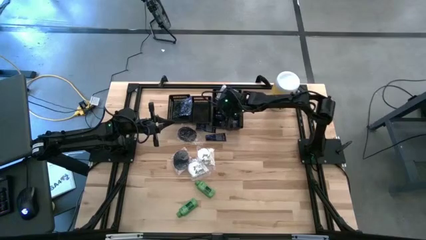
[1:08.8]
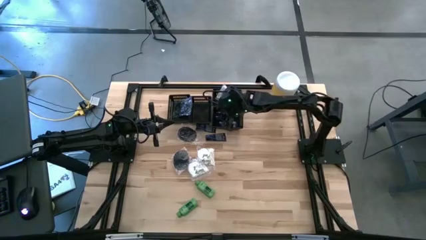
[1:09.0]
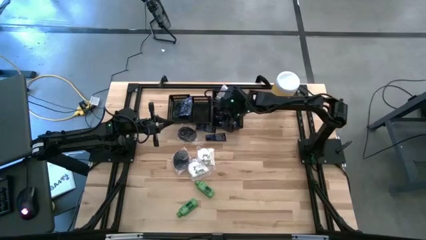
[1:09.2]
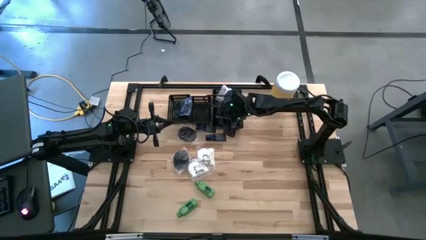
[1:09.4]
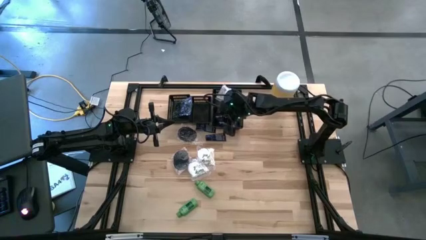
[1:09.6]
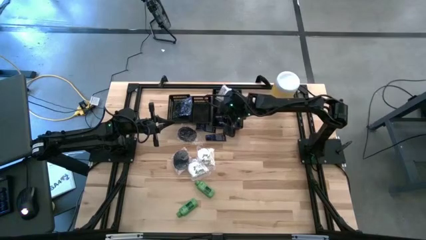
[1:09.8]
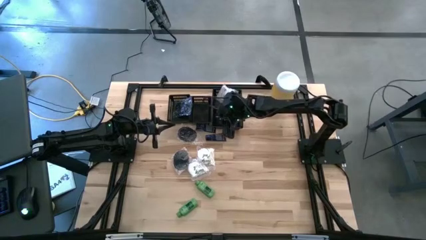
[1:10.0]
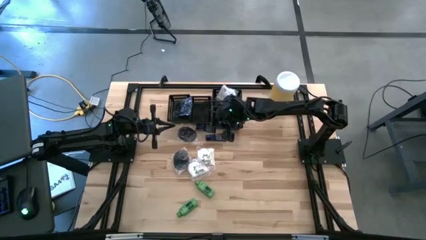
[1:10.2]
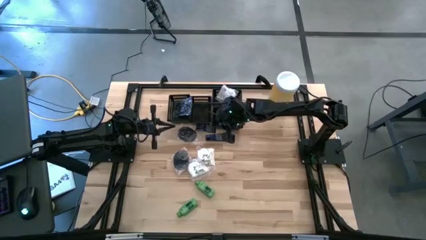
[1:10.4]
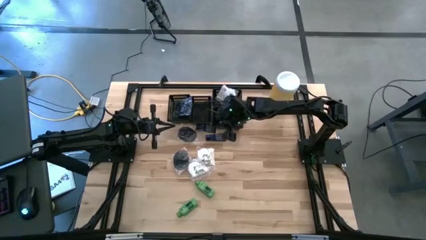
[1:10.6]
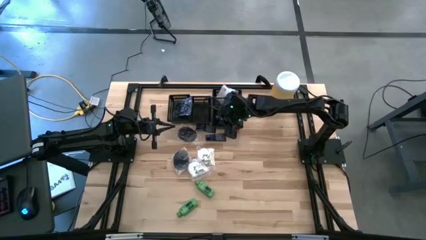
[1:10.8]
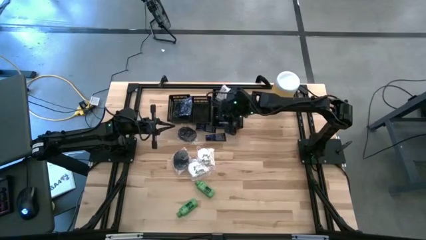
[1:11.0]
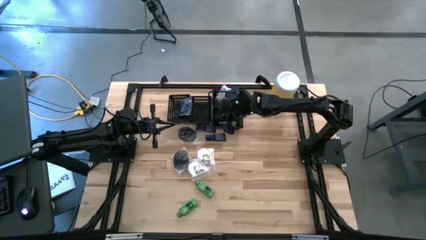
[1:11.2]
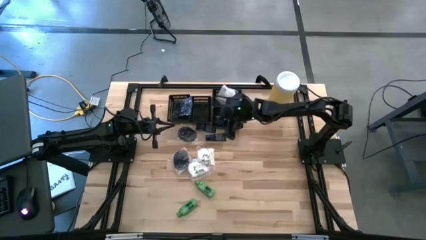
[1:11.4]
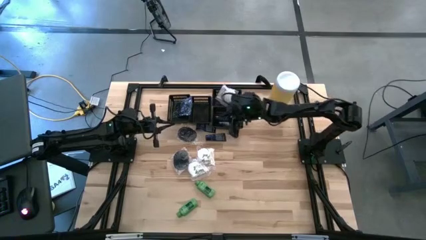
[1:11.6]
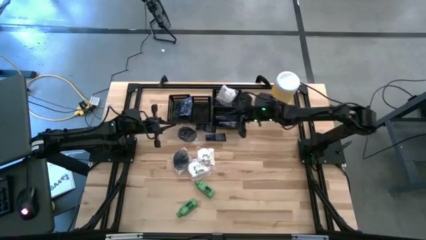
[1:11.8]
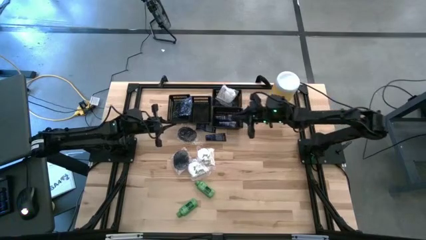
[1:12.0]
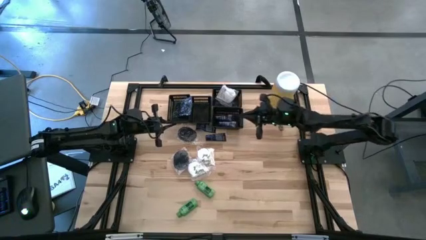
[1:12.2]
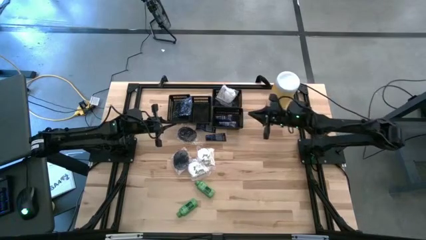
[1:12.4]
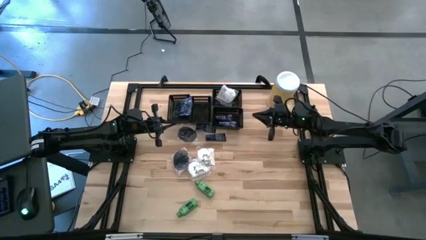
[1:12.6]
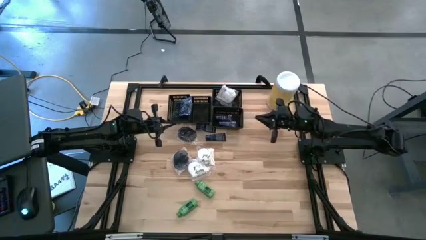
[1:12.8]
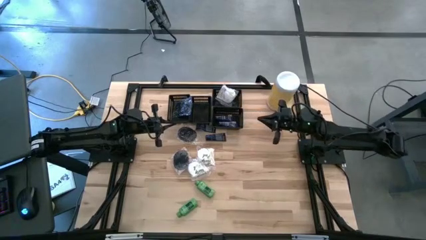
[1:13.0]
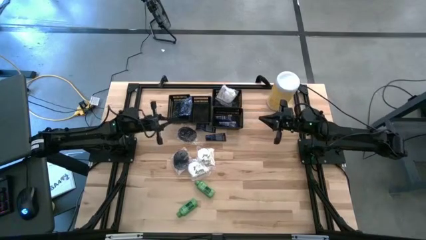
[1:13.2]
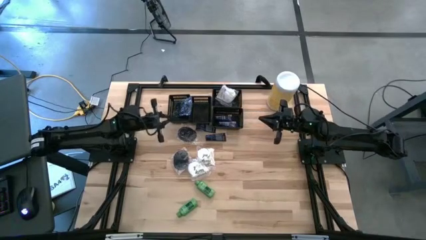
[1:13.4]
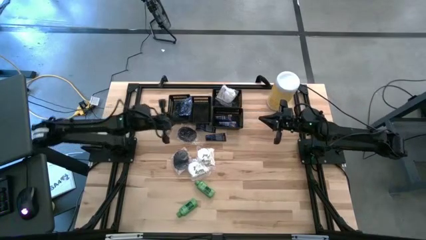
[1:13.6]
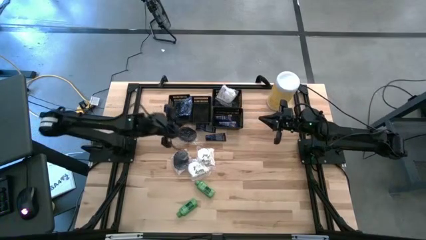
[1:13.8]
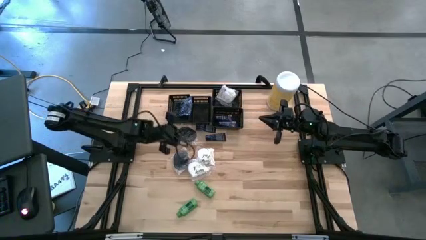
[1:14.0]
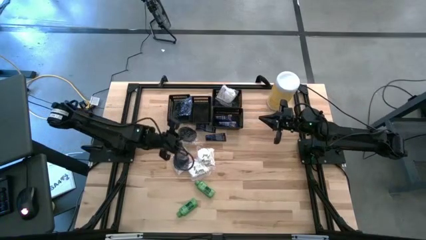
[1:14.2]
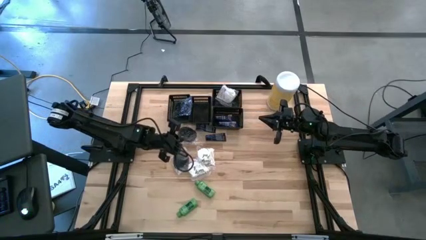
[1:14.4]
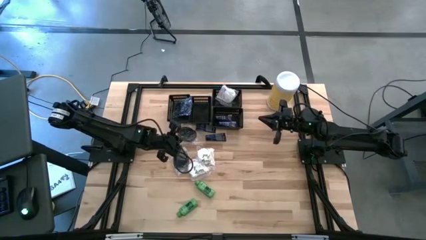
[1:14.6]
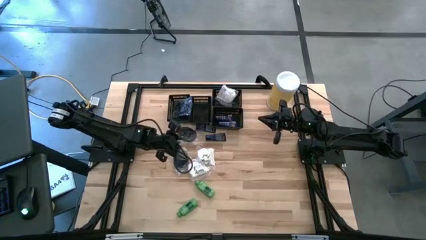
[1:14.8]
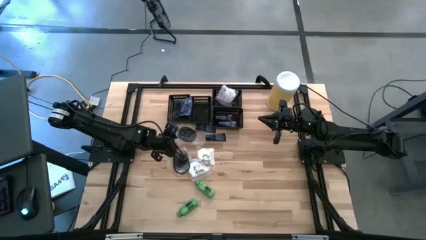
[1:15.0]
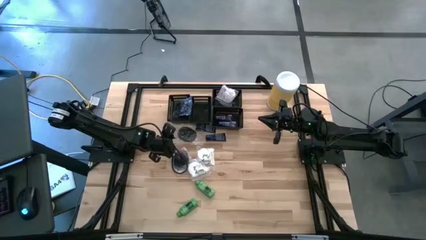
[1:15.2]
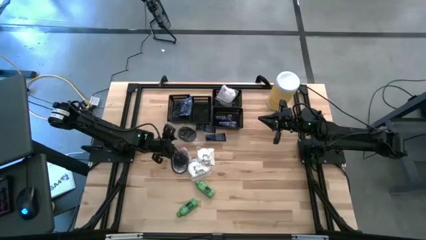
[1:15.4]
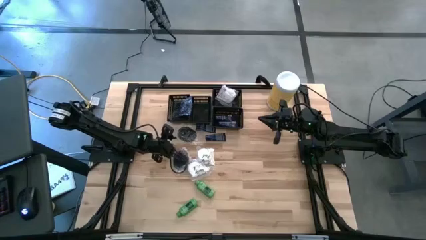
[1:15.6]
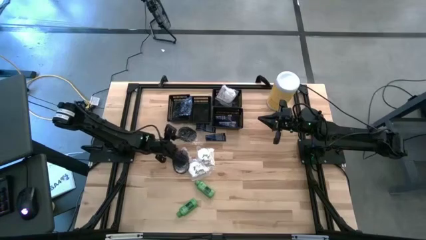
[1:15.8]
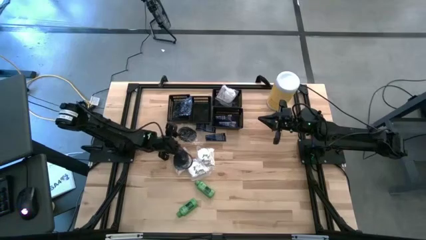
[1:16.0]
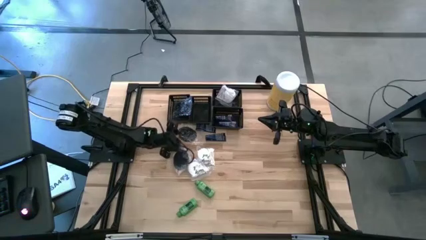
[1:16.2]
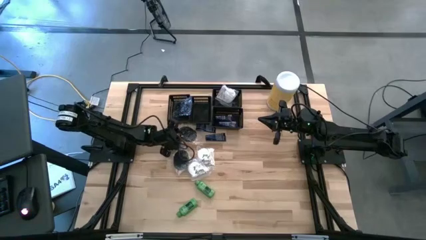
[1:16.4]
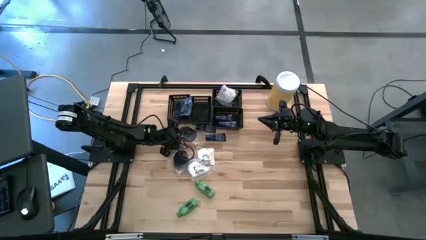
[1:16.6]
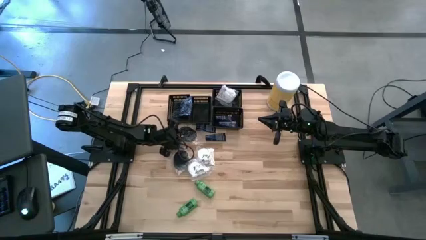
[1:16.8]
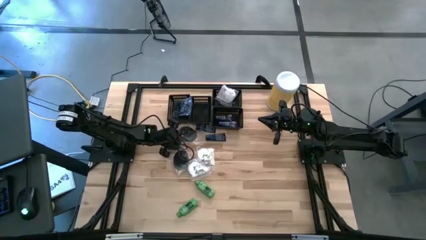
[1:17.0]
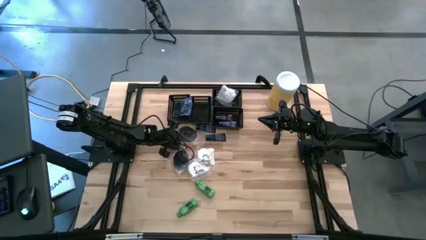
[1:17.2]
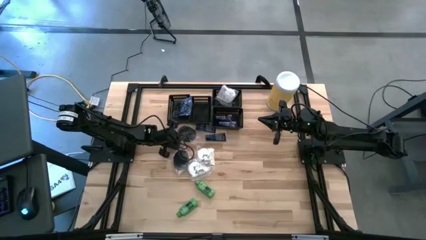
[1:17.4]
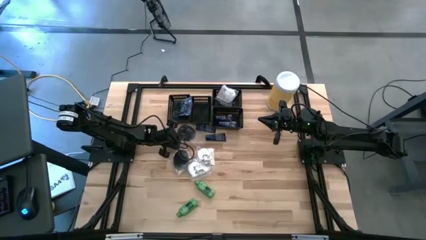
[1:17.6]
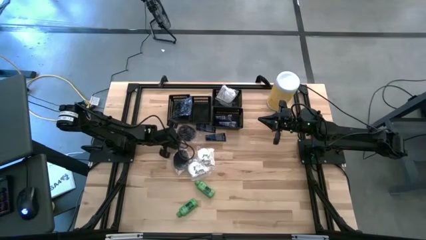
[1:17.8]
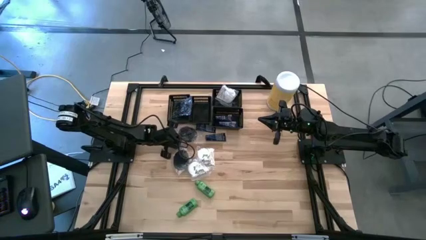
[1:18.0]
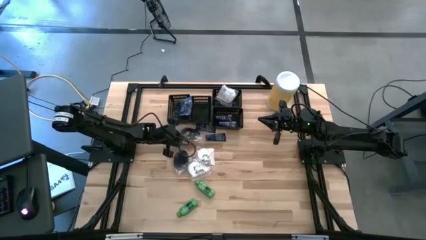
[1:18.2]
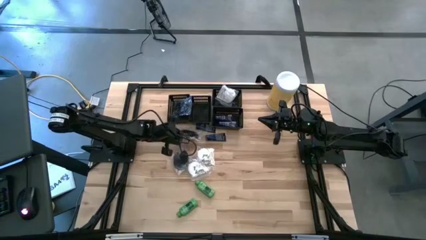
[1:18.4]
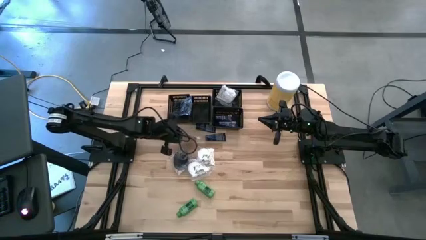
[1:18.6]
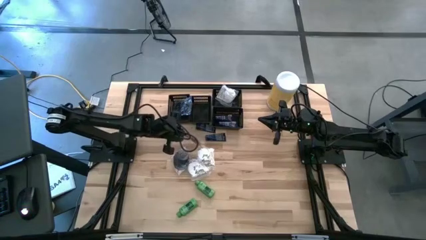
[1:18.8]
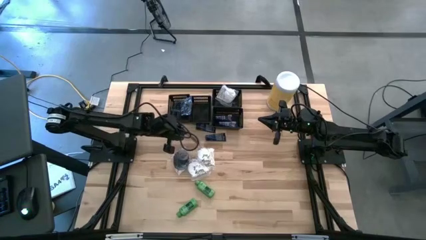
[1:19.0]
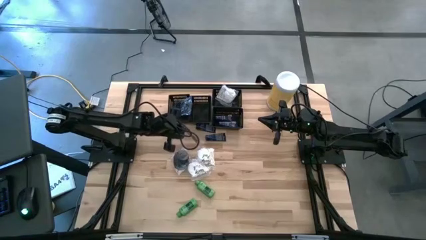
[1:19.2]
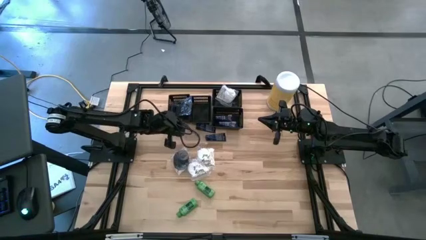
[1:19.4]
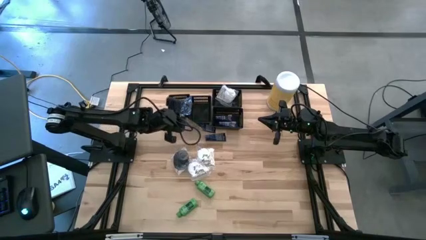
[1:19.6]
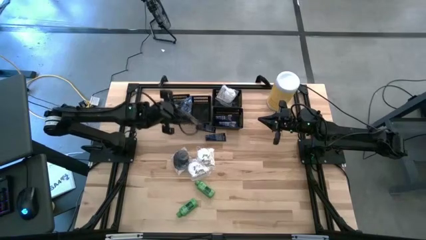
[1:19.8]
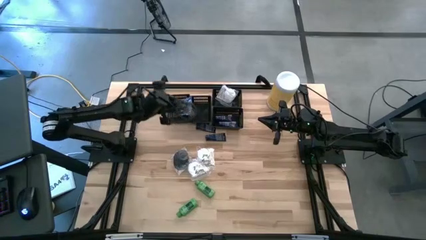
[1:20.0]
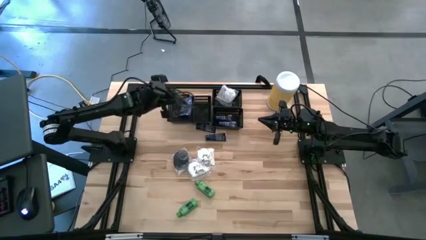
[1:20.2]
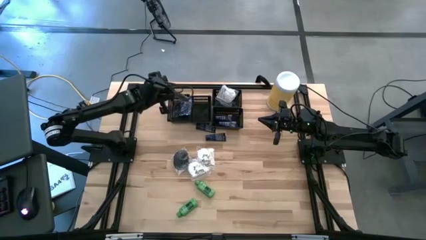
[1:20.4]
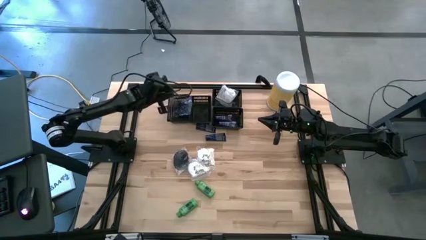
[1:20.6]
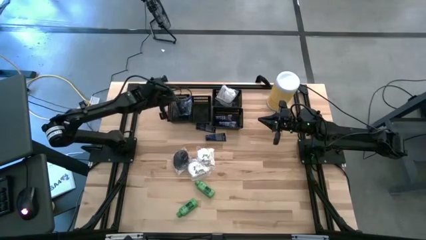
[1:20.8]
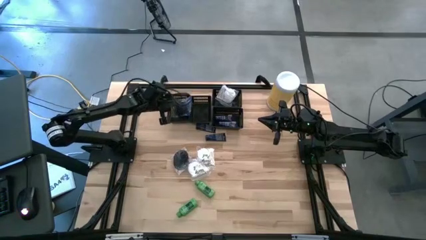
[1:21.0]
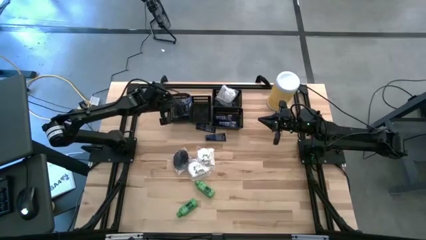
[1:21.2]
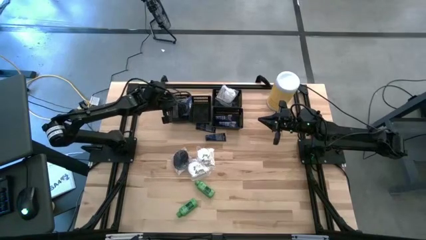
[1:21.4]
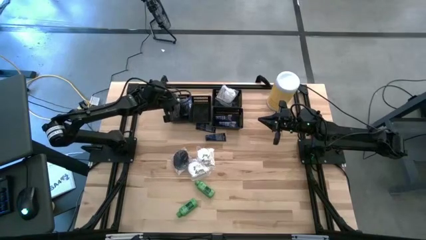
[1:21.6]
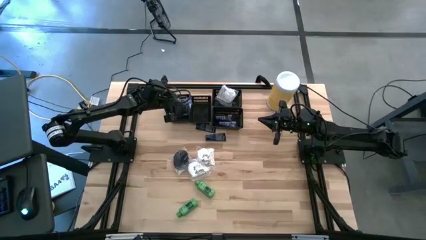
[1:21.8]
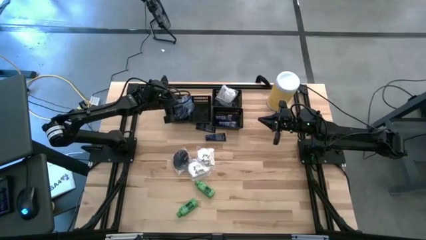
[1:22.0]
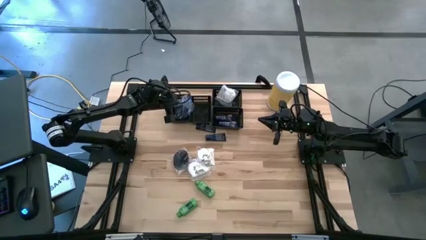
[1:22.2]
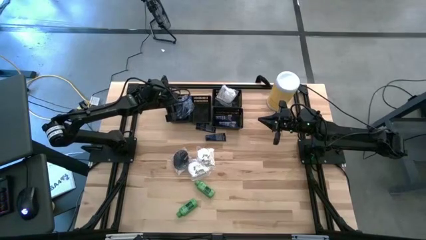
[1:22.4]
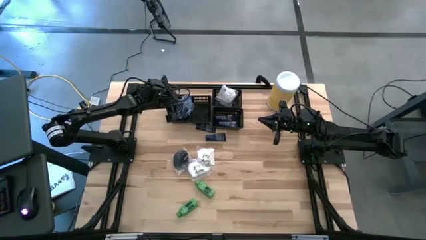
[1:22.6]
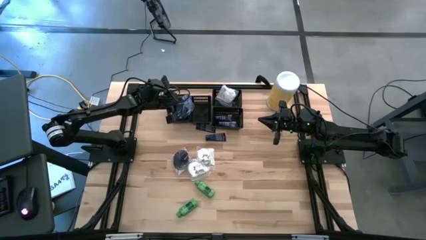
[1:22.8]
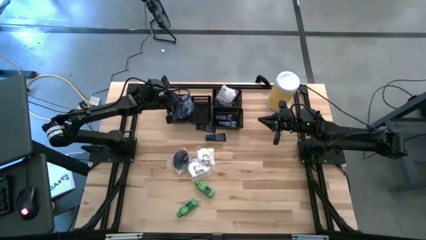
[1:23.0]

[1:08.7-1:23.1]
Task: Pick & Place Travel size toiletries
Put the top black hairbrush into the left black bin
